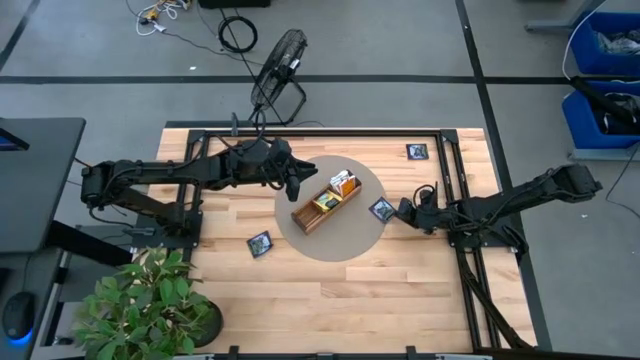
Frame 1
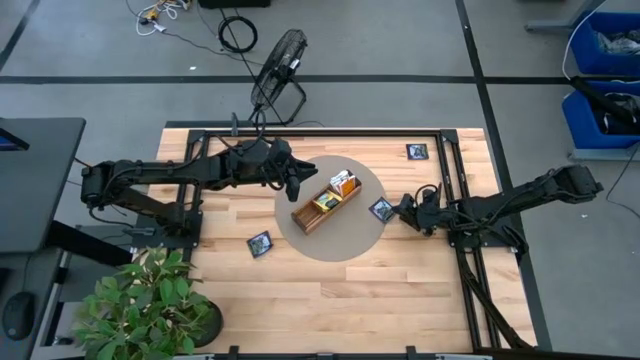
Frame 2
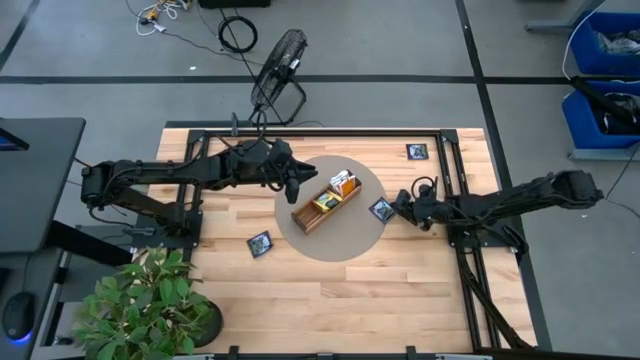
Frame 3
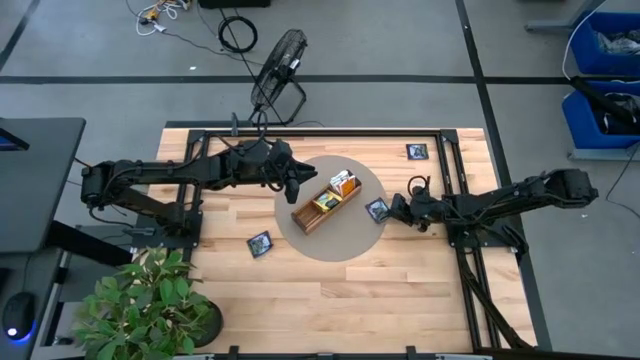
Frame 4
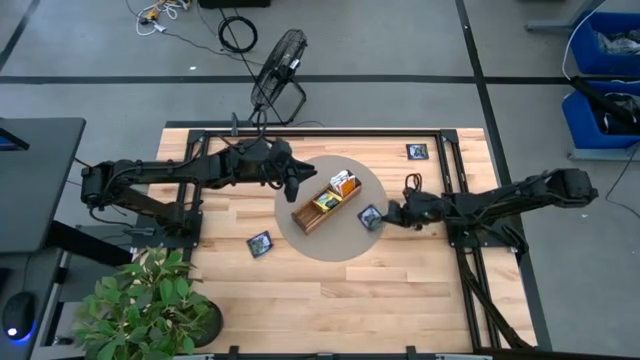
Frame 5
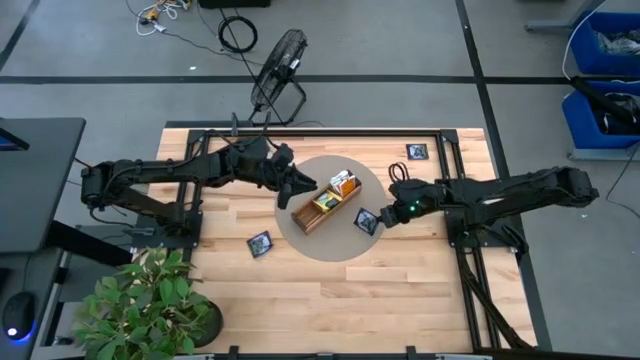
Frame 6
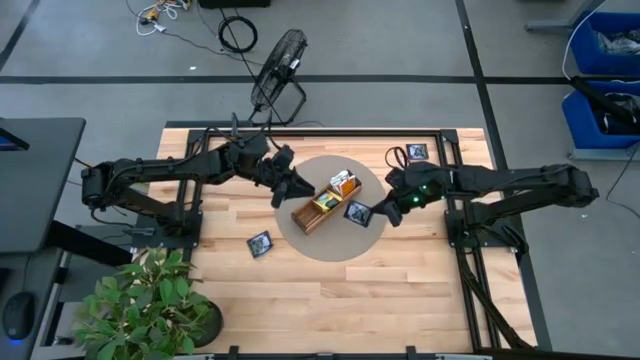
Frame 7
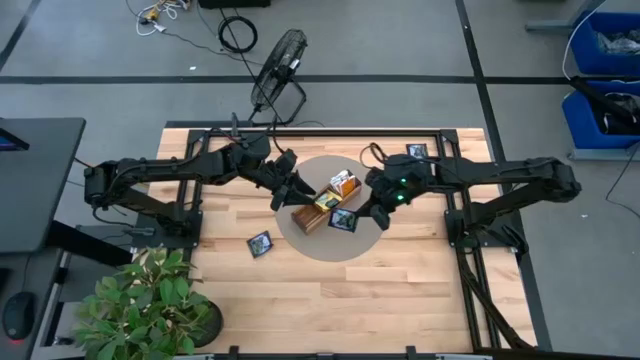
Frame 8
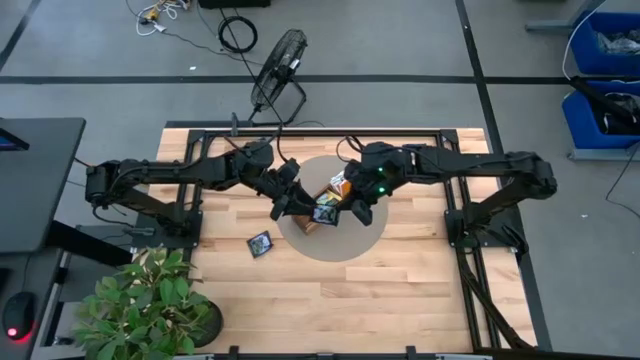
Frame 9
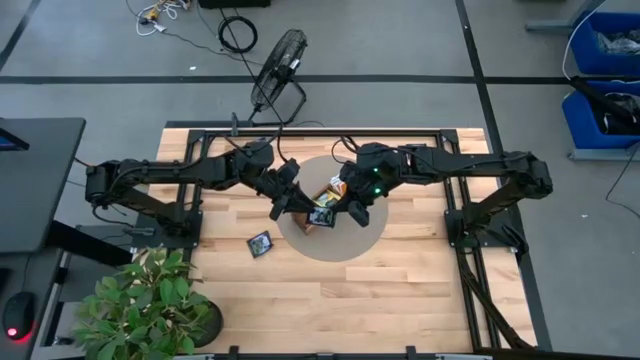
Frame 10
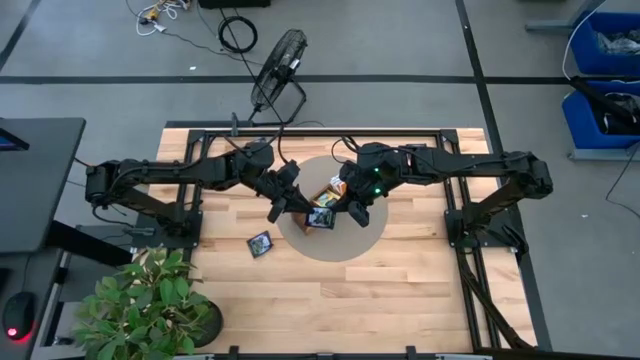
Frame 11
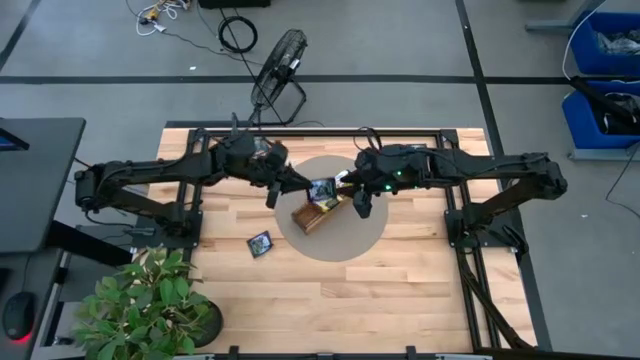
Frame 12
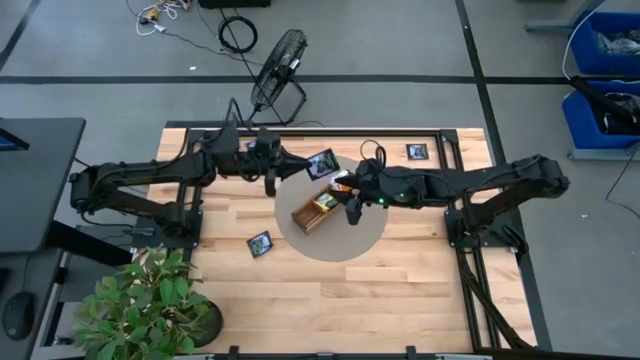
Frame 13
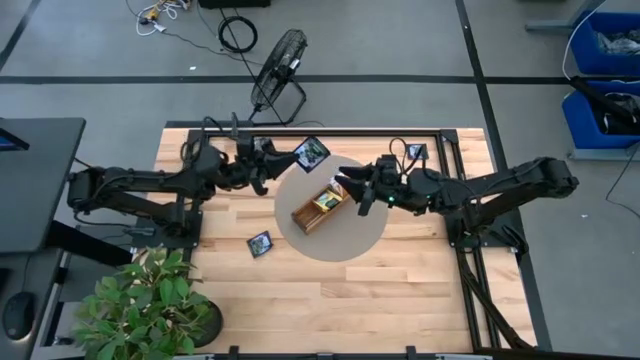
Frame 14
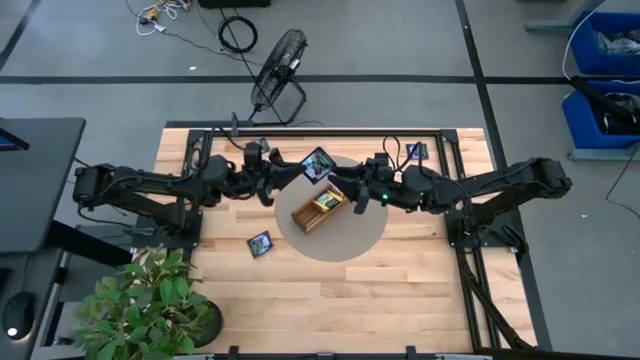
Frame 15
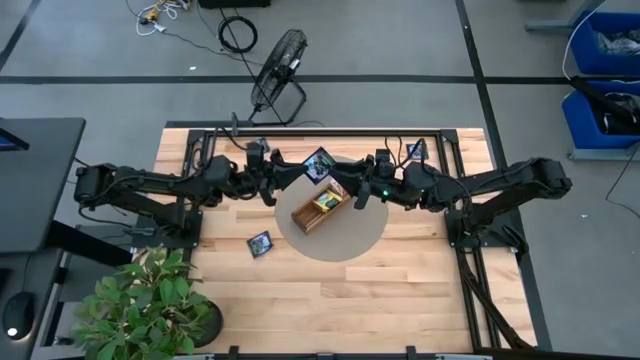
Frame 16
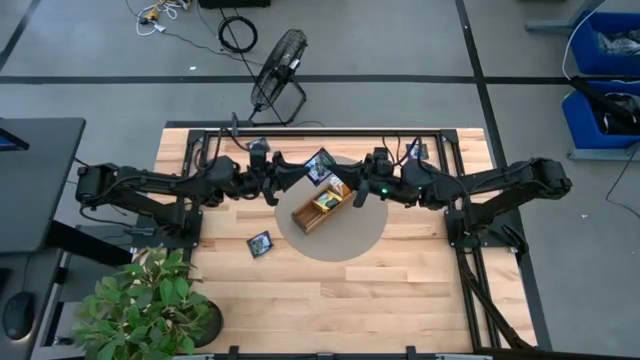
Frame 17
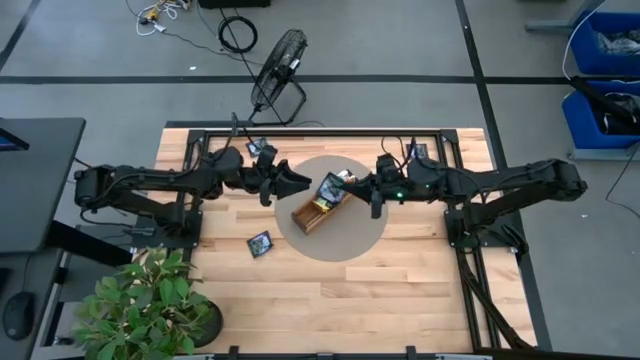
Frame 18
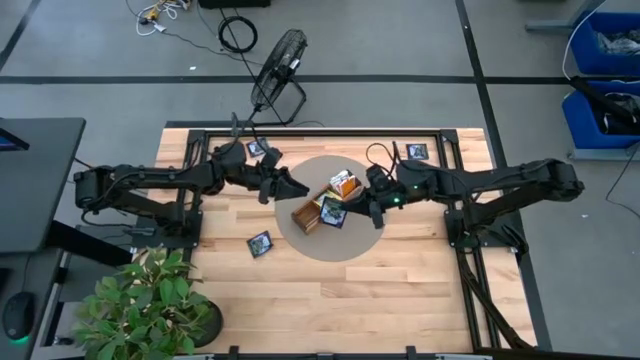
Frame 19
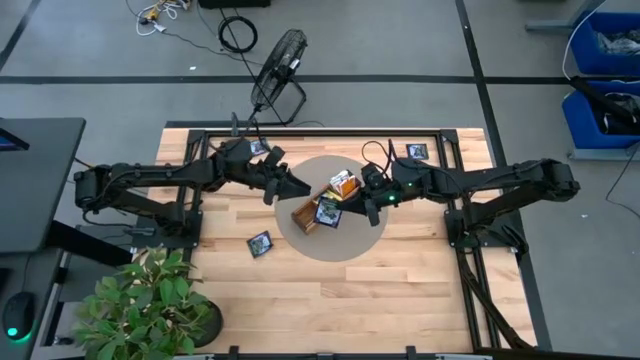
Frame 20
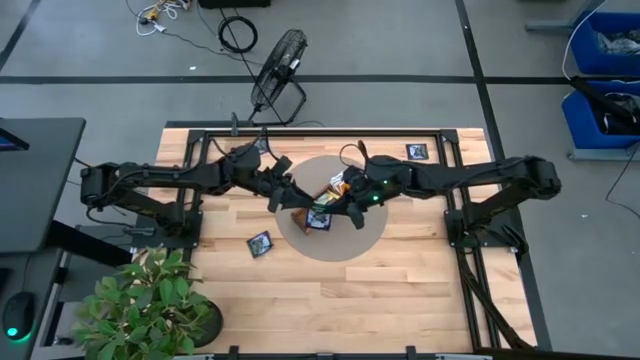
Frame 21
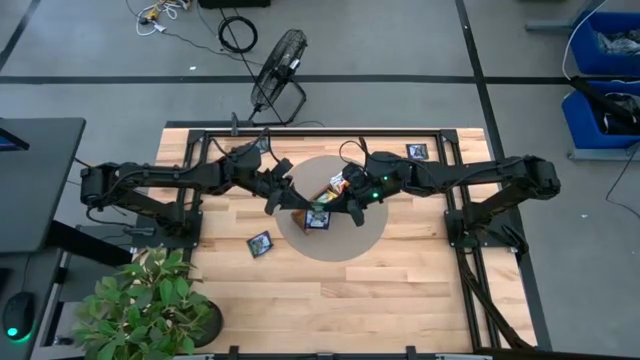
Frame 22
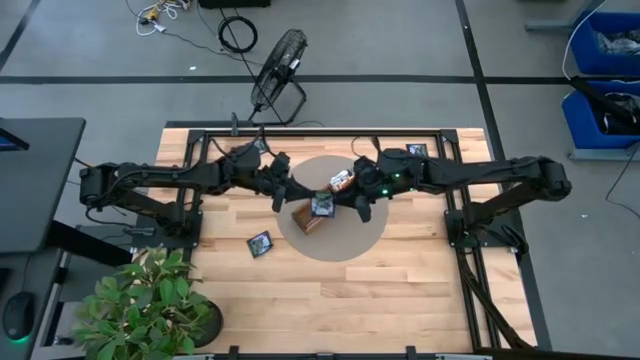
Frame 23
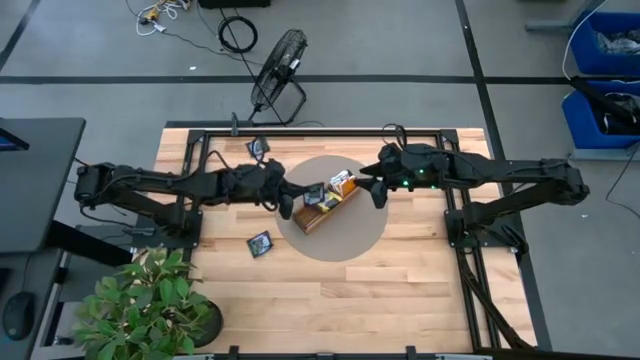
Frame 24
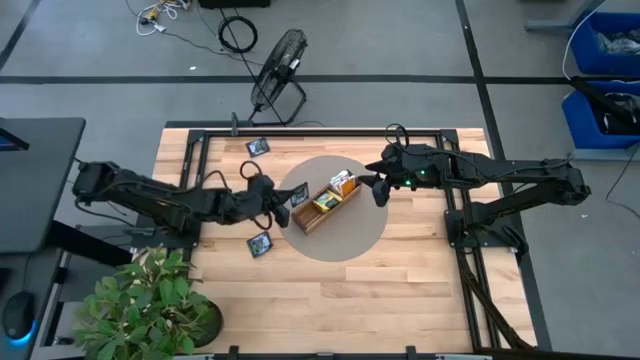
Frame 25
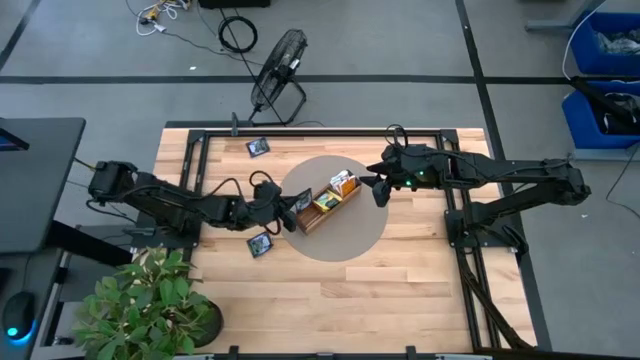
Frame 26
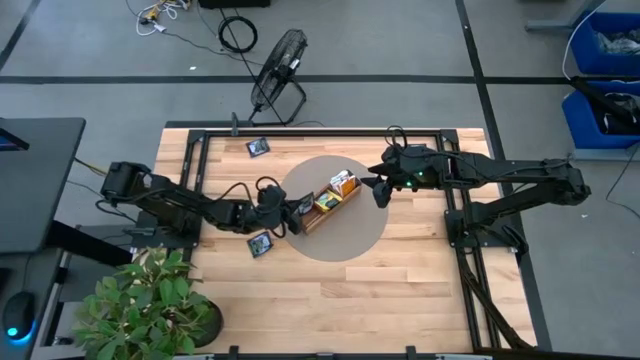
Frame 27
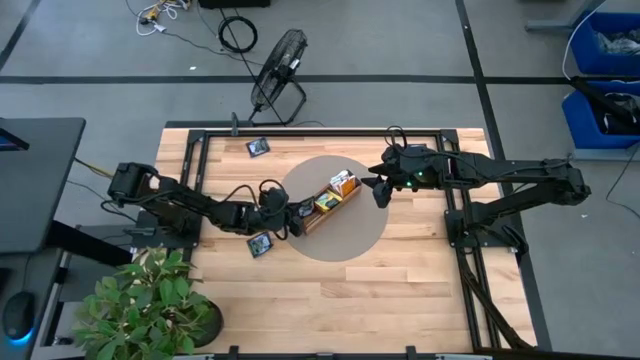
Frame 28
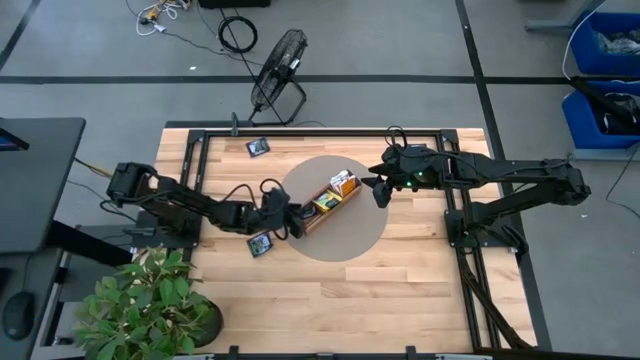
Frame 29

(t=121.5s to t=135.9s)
Task: Pick & Place Tea
Put the black tea bag into the left section of the wooden organizer

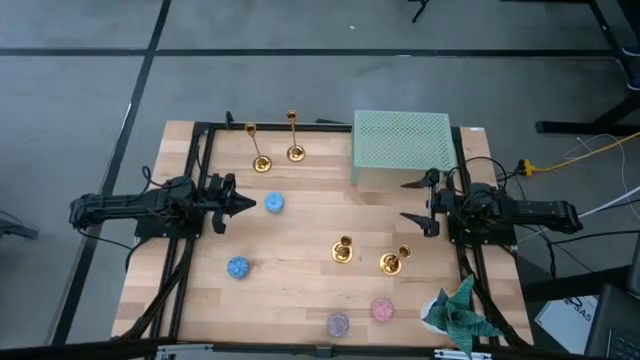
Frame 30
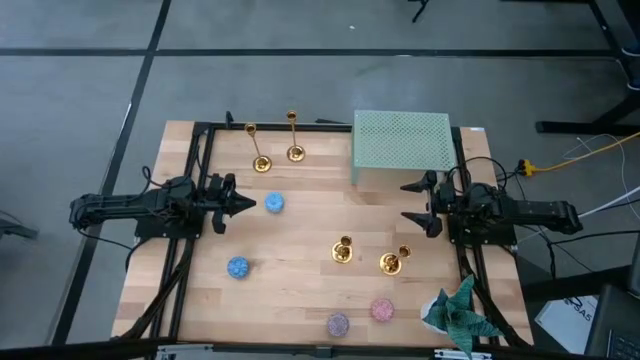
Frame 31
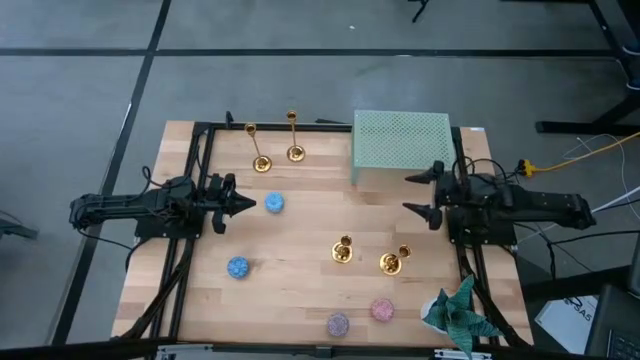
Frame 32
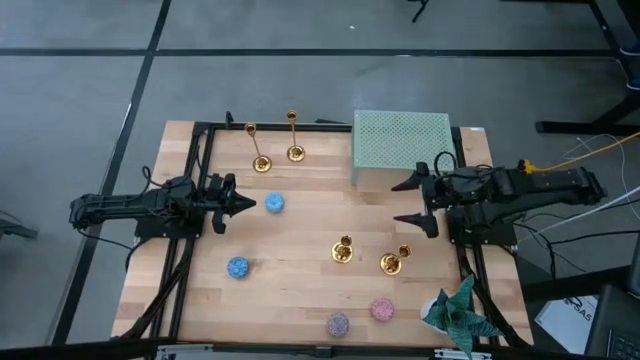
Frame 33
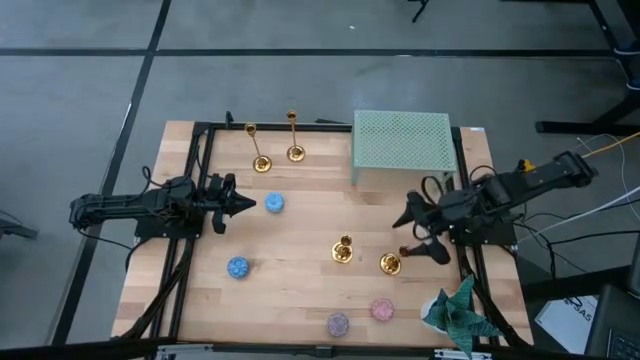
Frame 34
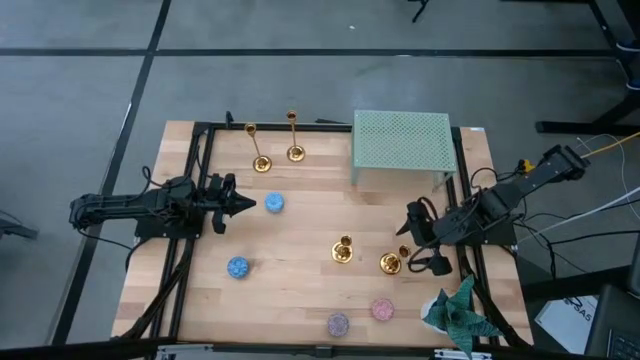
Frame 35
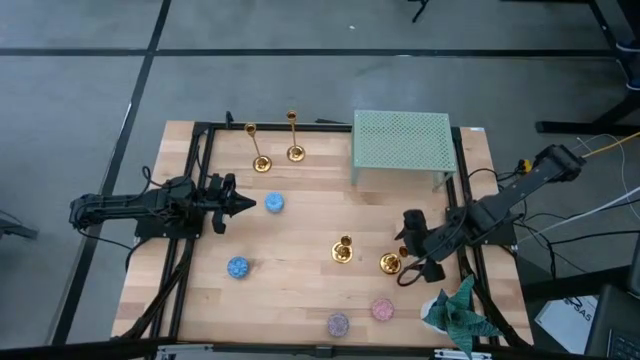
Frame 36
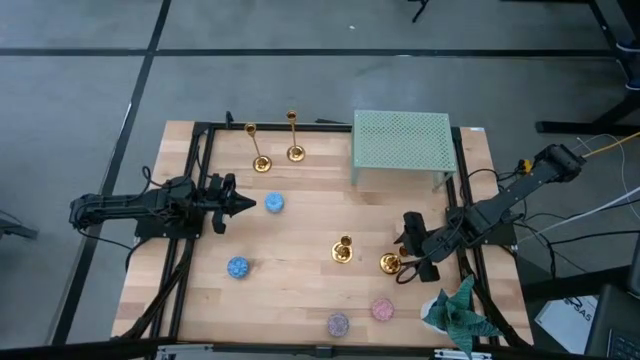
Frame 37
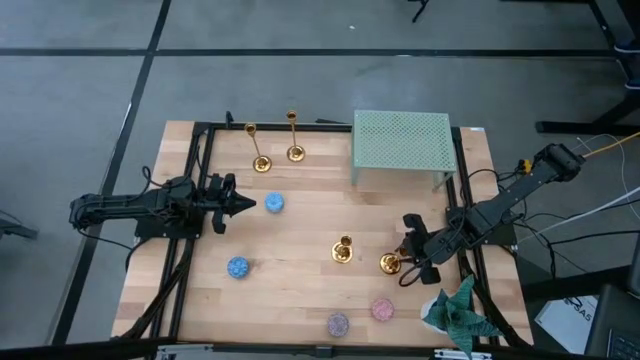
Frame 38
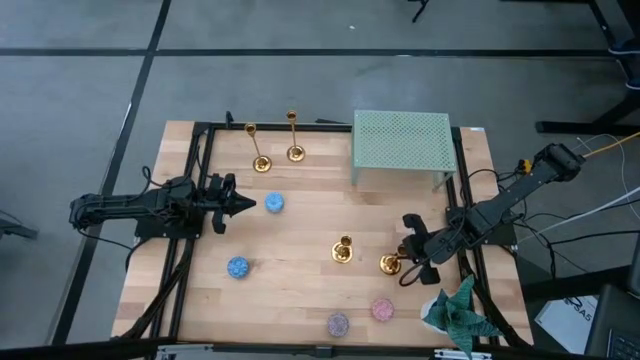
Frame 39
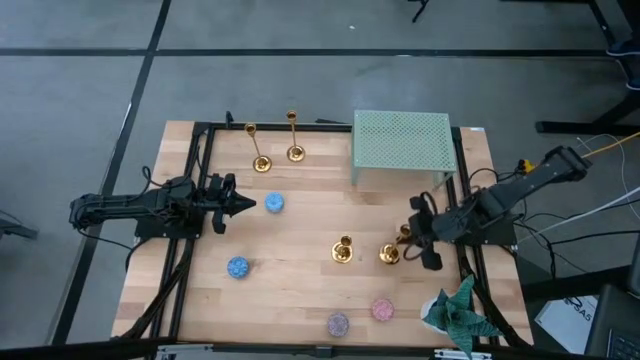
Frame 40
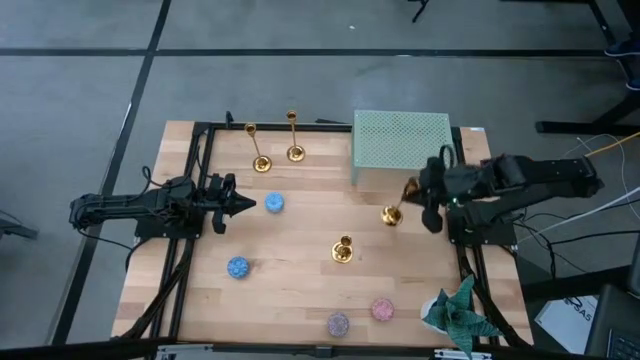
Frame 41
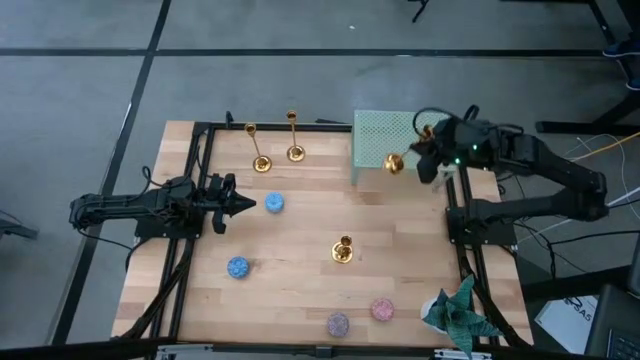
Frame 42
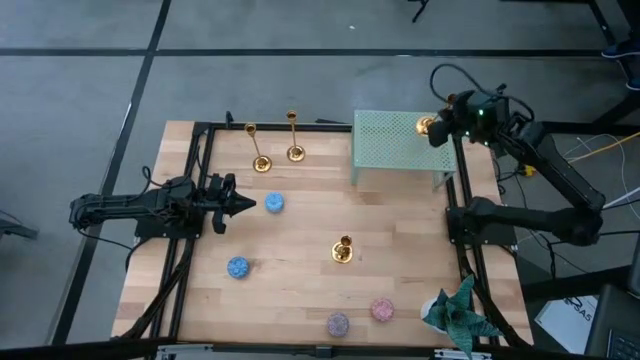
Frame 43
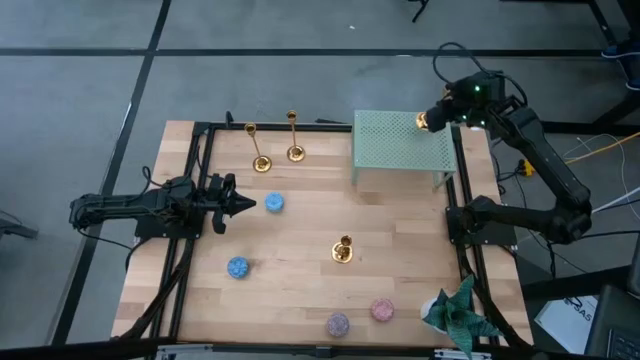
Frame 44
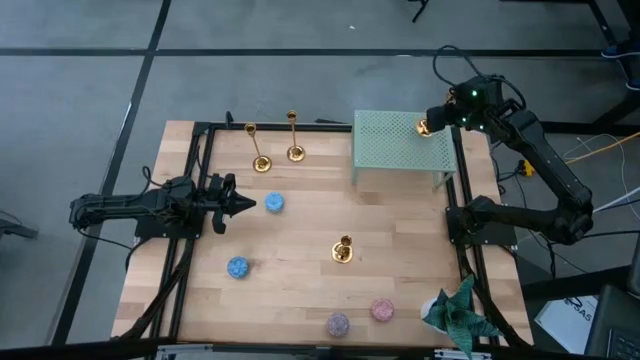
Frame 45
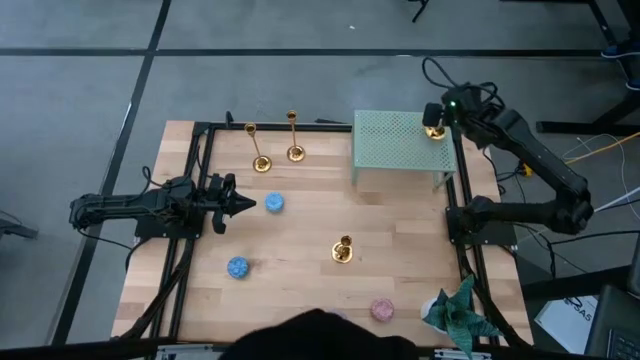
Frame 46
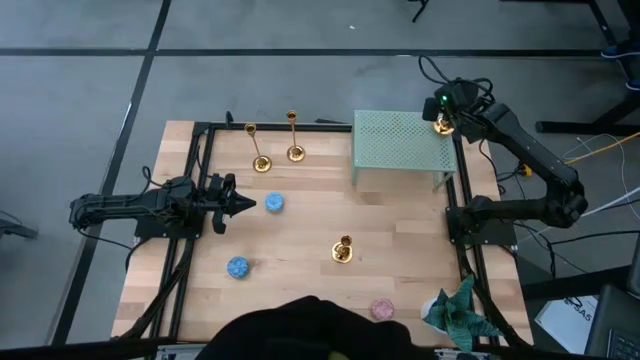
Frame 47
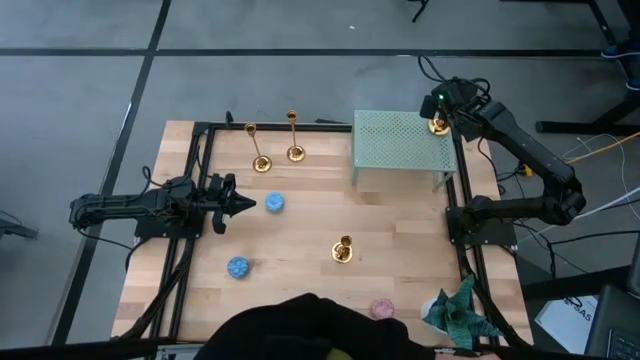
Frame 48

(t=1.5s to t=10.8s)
Task: Pick & Place candle stick holders
Put the gold candle holder on the shelf
